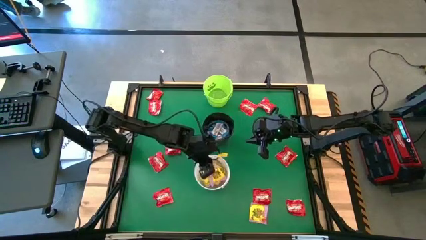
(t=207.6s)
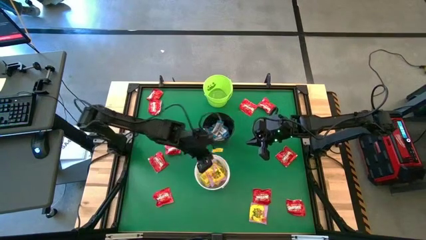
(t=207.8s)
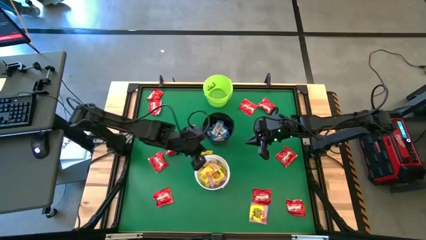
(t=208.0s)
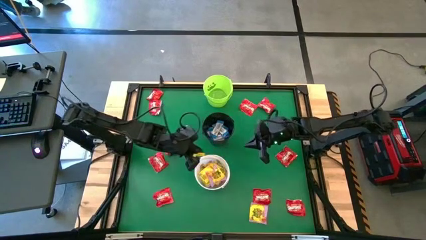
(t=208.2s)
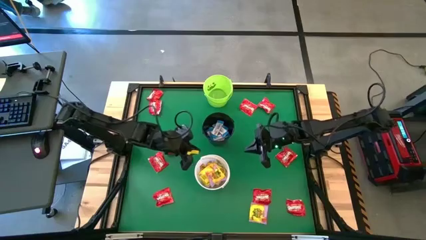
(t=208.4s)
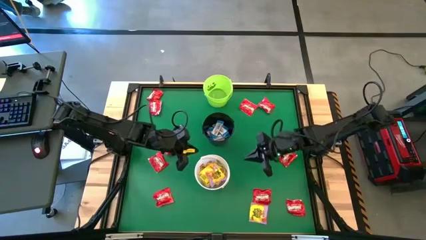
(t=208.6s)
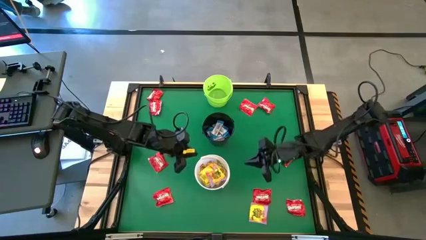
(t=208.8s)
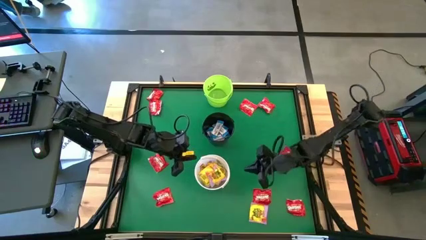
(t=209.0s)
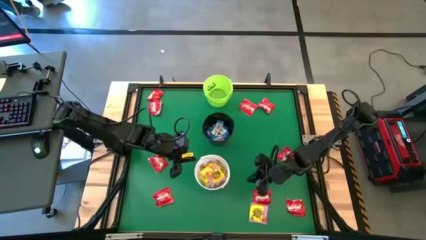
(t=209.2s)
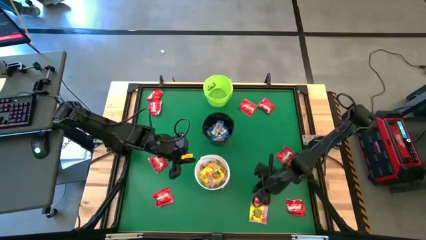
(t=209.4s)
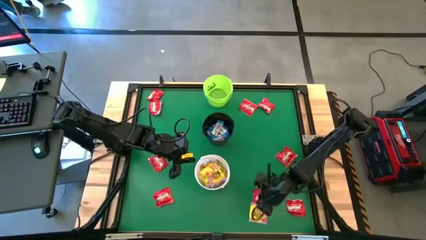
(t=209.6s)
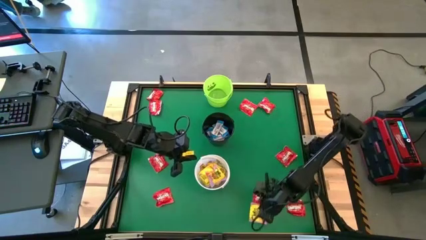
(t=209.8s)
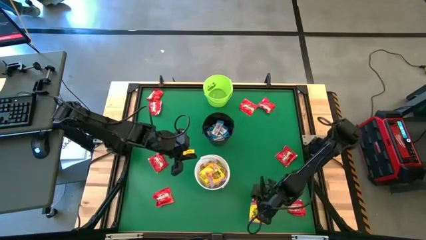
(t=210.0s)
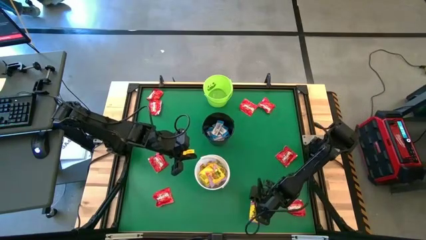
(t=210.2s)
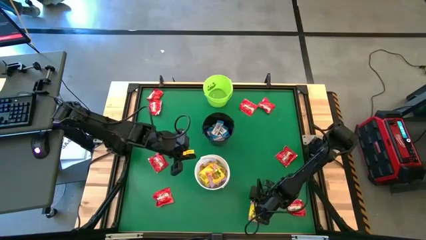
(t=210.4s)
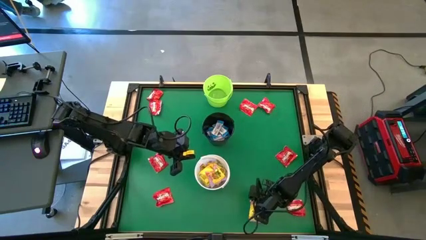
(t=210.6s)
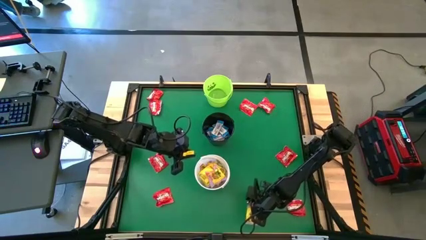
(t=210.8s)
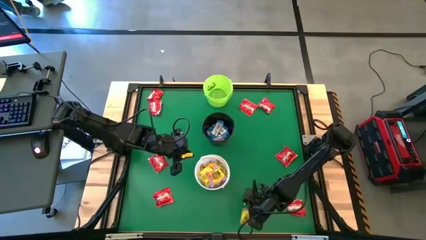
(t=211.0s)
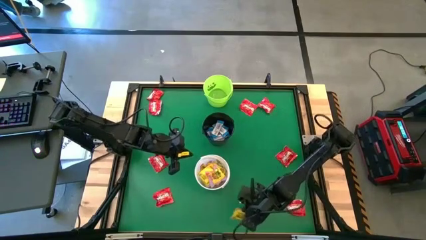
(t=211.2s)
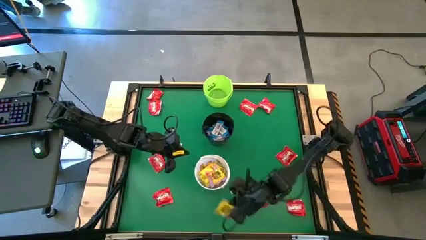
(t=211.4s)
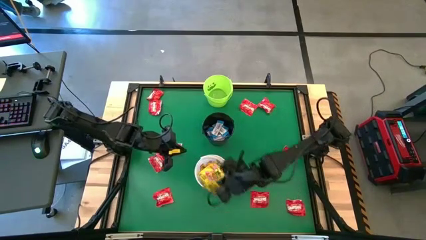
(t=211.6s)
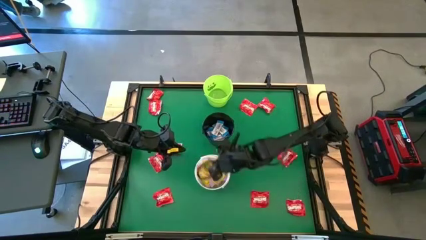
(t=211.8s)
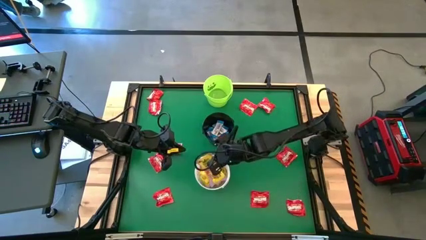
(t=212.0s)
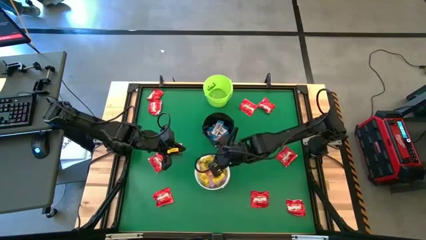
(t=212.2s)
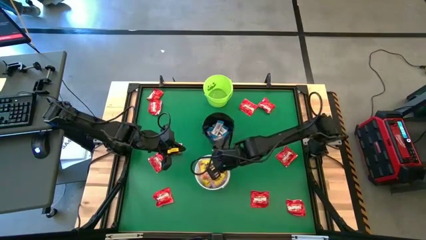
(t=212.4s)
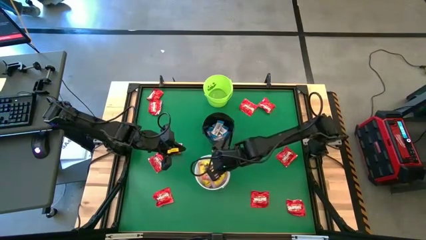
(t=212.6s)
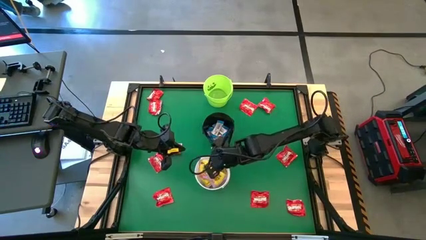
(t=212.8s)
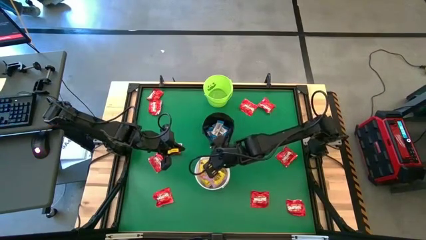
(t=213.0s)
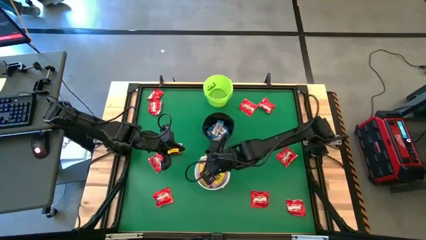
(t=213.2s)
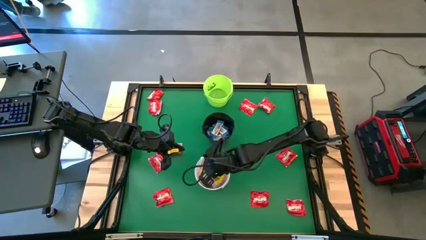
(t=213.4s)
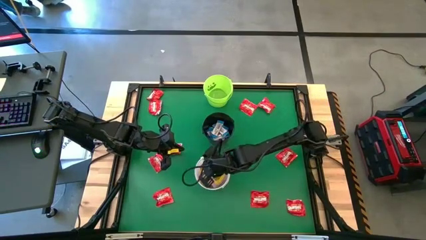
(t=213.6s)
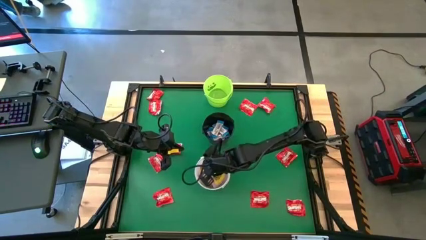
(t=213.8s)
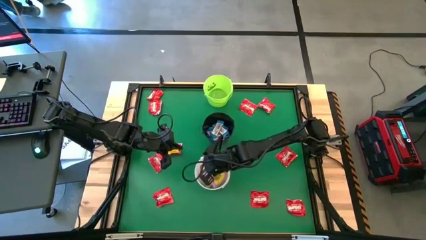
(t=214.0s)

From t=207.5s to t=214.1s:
Task: Sort candy by brand, put in halloween buckets
Put the yellow candy into the white bucket

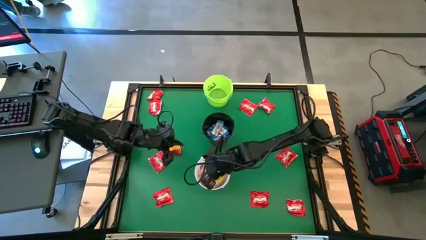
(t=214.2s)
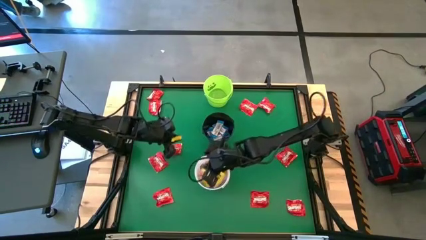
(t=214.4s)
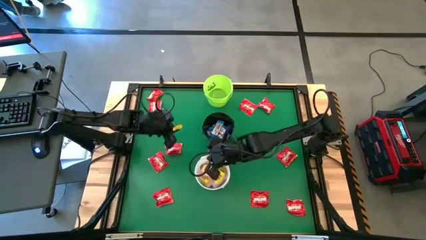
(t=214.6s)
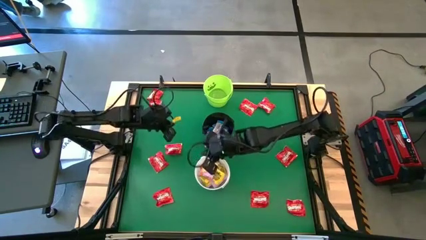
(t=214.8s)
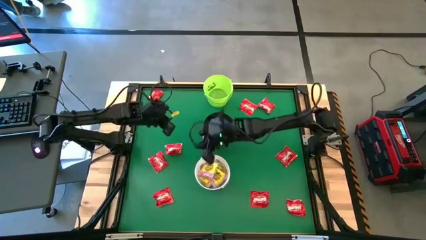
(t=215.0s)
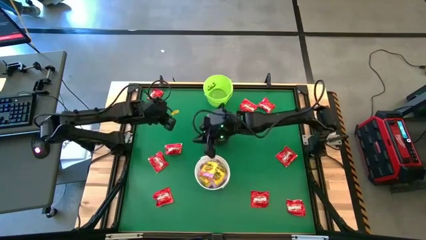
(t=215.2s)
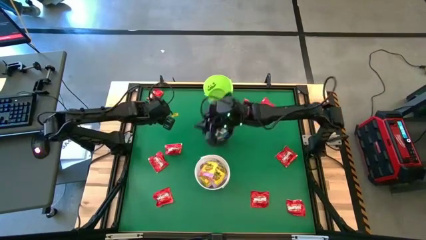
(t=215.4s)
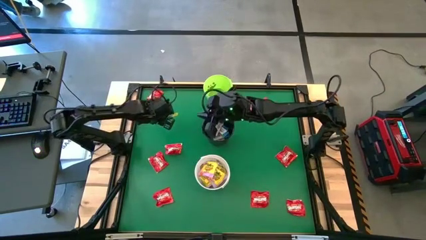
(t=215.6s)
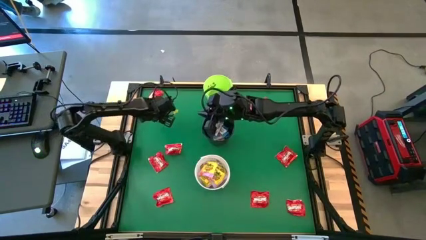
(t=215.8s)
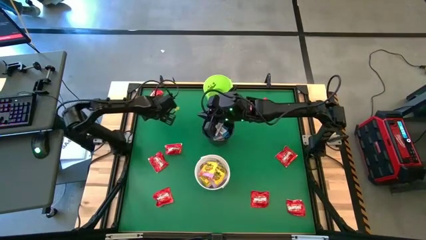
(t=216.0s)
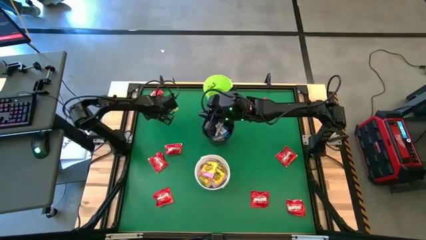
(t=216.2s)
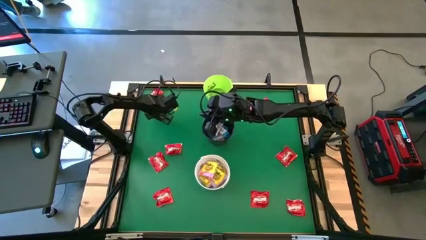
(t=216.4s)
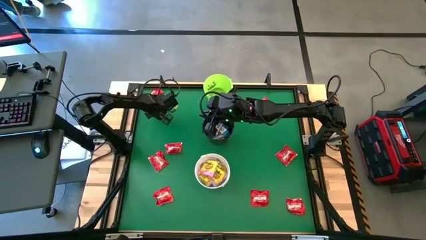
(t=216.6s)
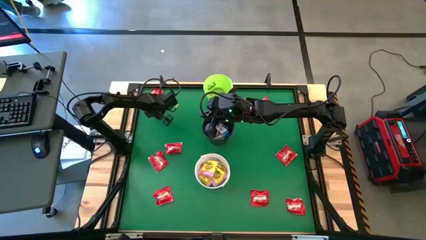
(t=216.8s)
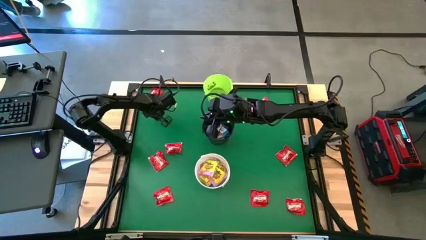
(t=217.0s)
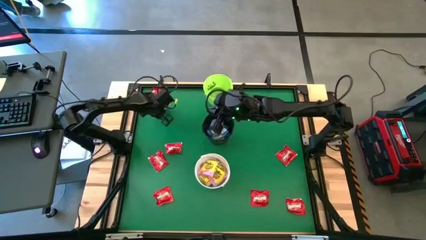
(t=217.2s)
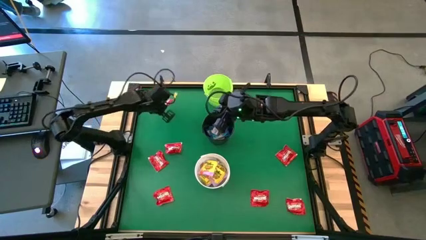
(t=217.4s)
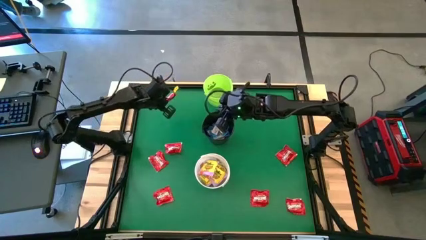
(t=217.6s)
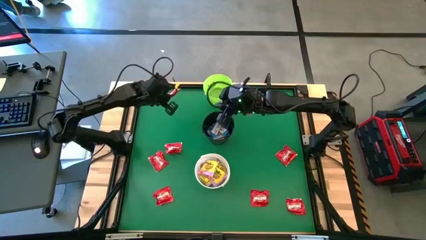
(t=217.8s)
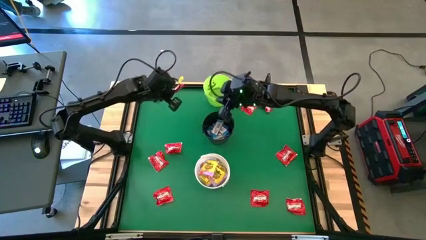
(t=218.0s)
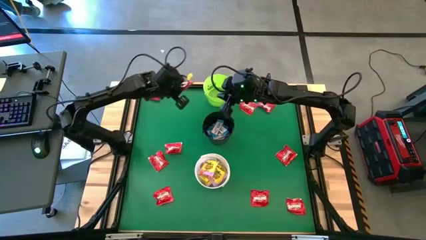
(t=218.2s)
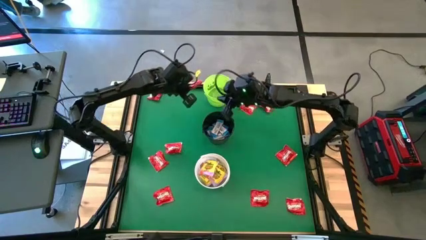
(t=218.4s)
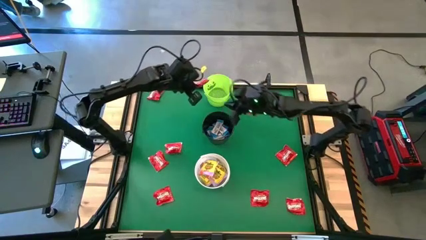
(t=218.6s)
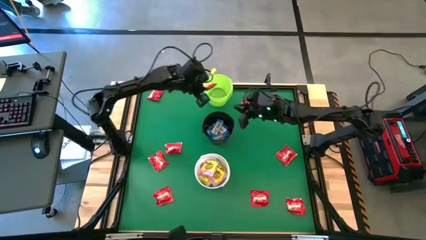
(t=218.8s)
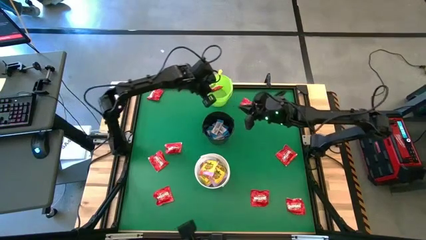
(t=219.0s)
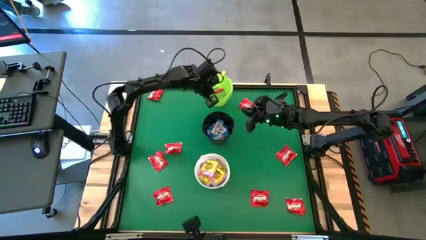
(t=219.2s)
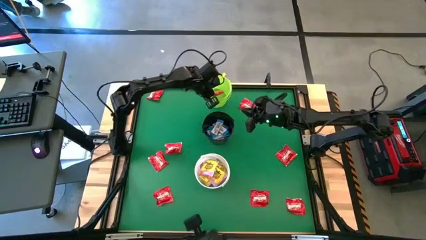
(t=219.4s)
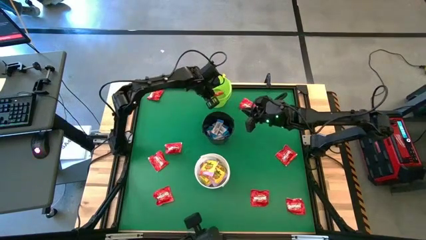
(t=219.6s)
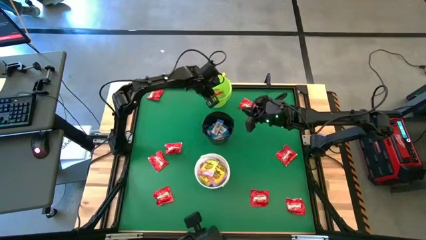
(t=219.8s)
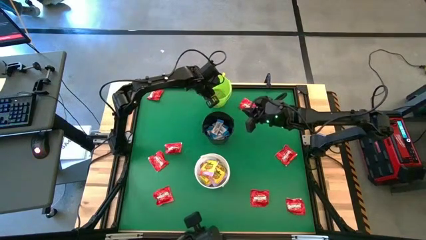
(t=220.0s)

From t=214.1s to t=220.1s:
Put the red candy into the green bucket

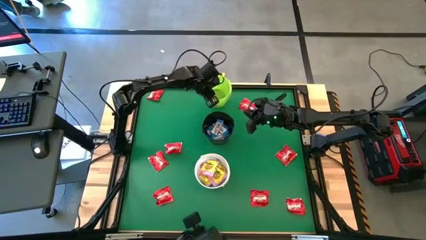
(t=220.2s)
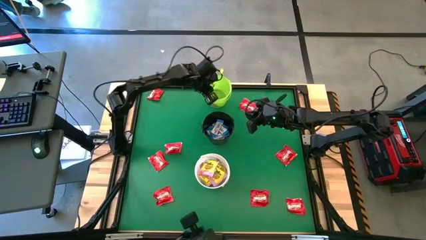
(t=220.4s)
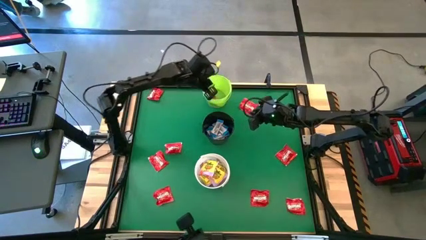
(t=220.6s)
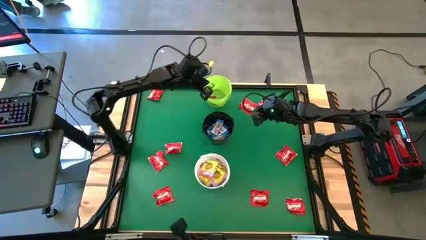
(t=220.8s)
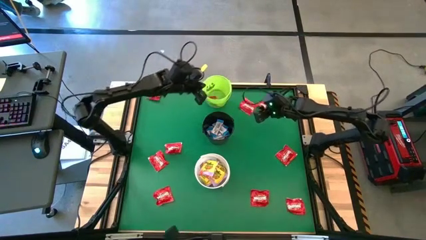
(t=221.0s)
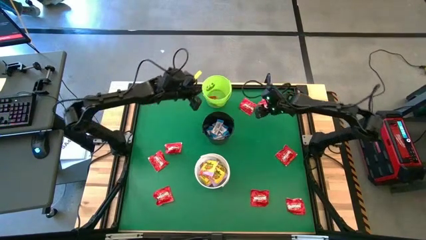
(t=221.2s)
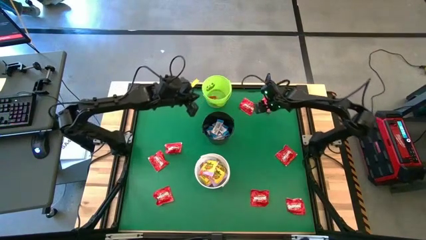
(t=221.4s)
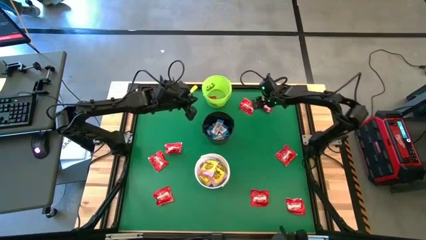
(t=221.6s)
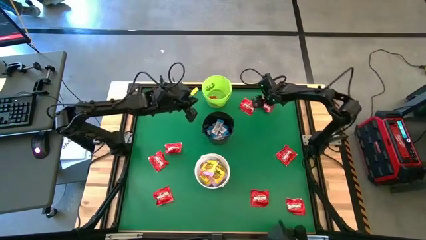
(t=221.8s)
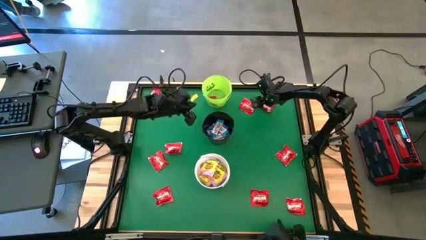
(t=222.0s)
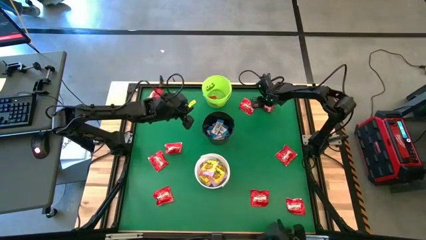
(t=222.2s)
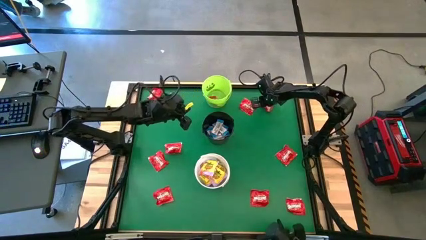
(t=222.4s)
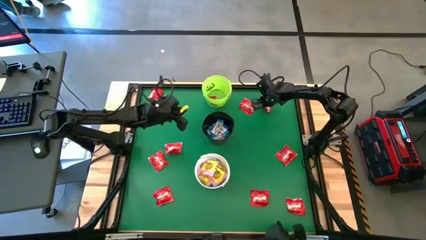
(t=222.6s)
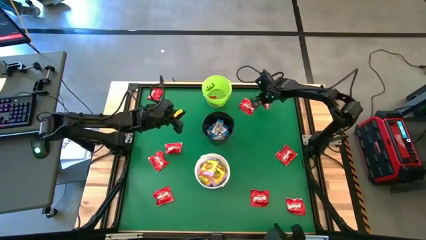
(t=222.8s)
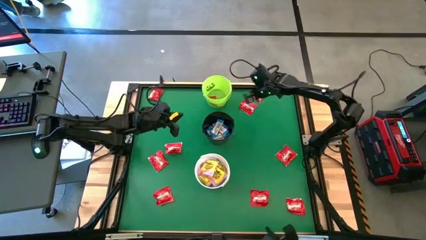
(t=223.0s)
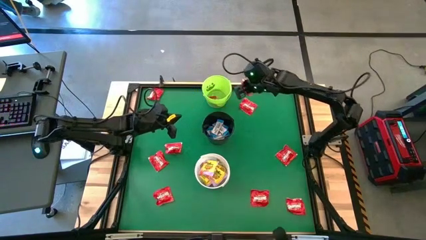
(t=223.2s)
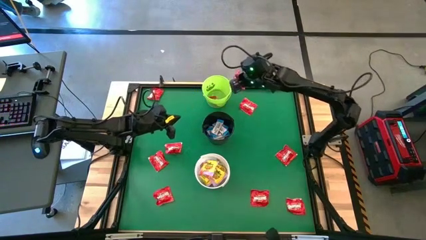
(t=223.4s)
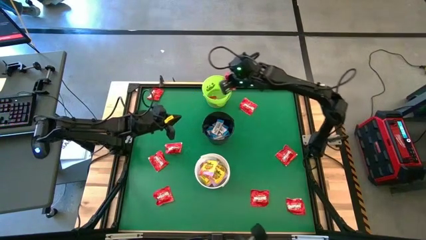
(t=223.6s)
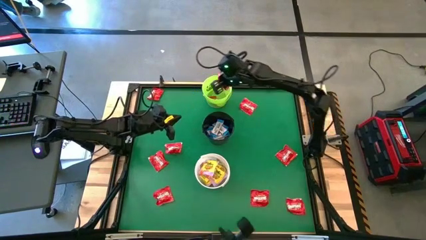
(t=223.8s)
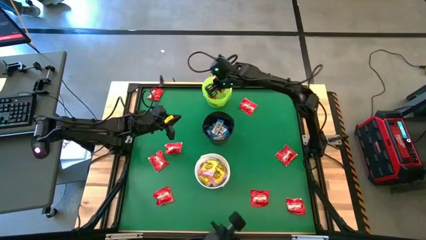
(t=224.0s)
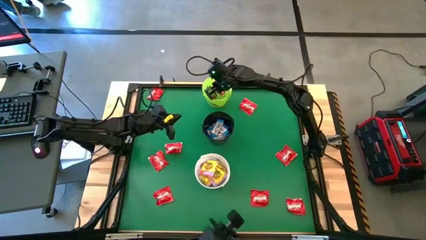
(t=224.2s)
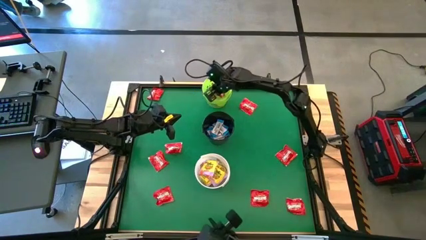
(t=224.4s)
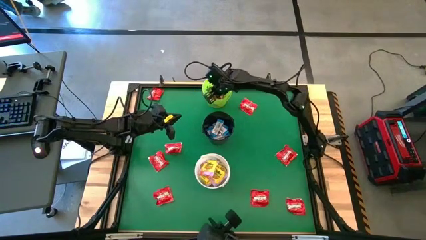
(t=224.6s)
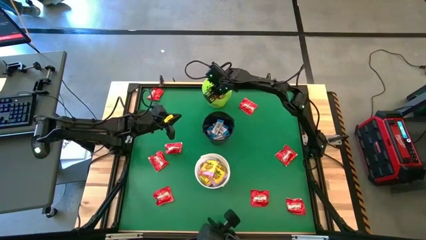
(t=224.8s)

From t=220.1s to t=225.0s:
Put the red candy into the green bucket
